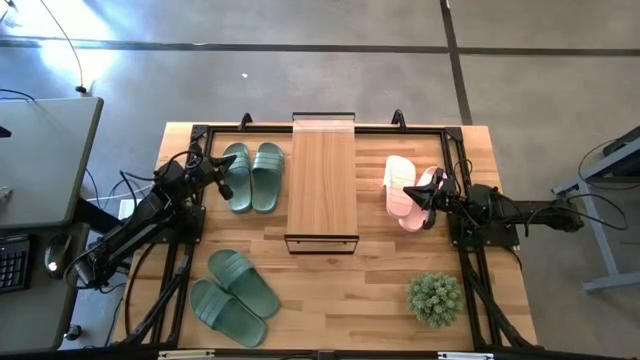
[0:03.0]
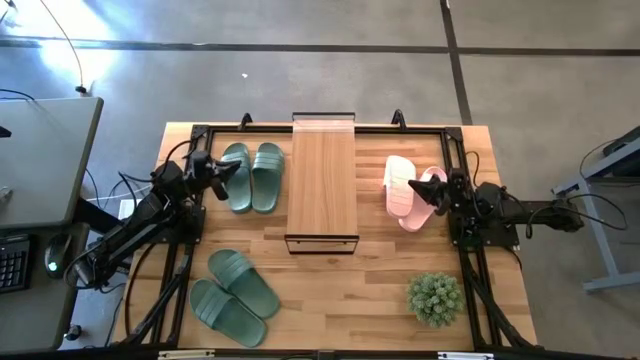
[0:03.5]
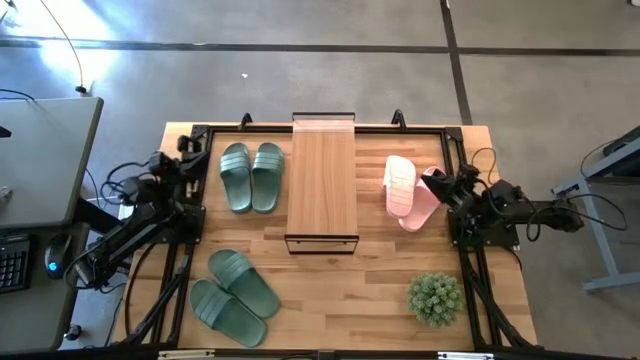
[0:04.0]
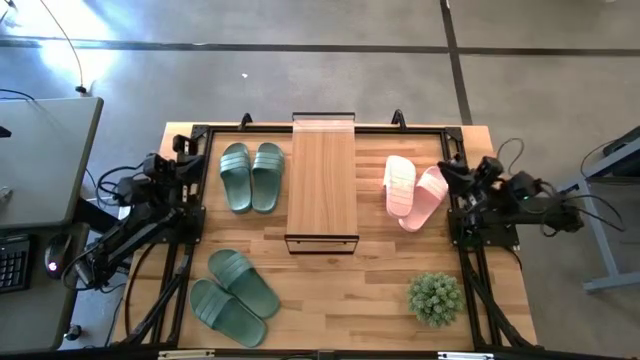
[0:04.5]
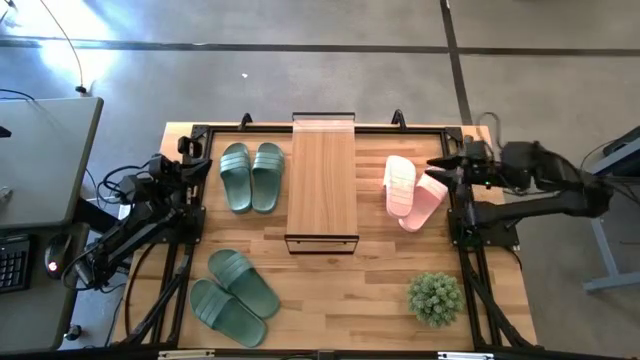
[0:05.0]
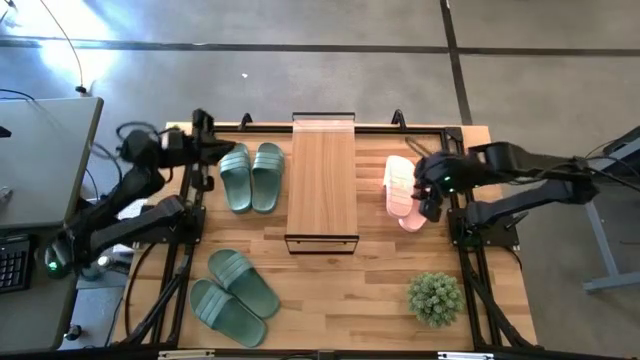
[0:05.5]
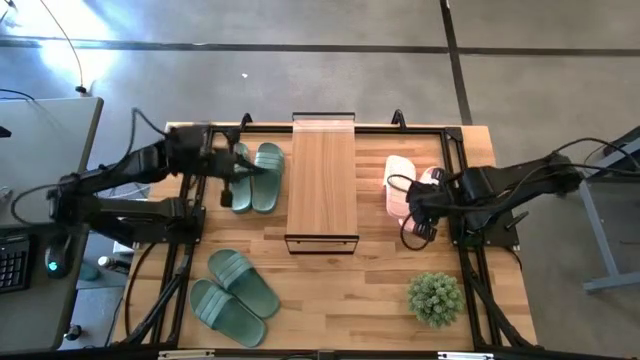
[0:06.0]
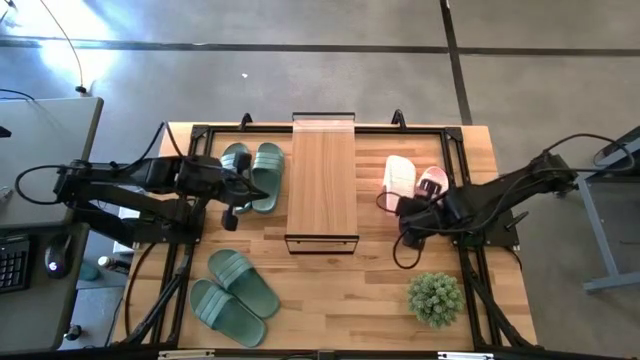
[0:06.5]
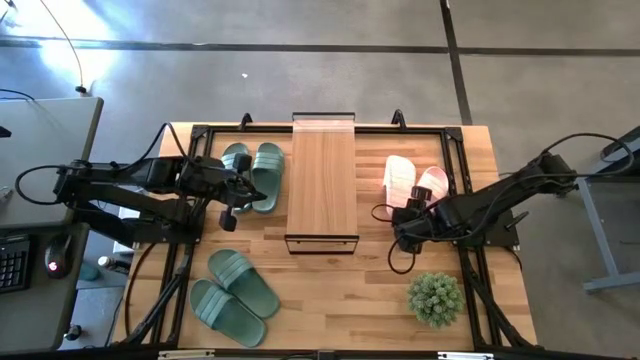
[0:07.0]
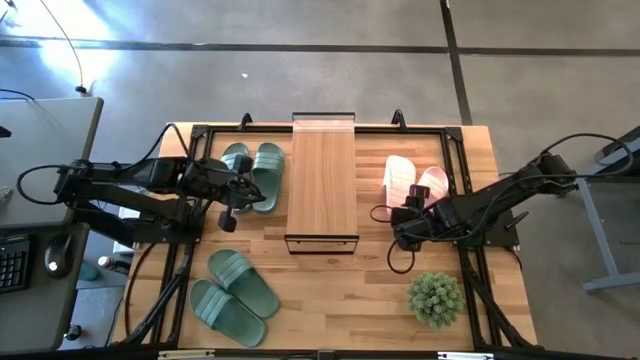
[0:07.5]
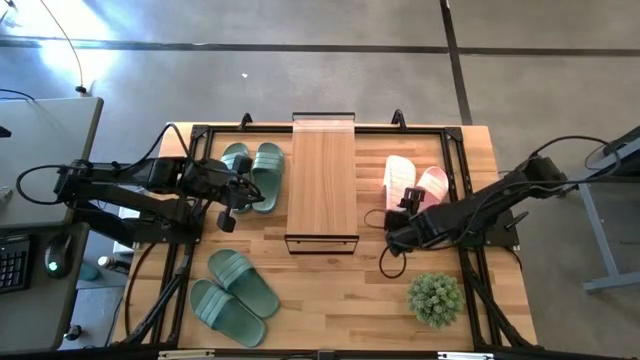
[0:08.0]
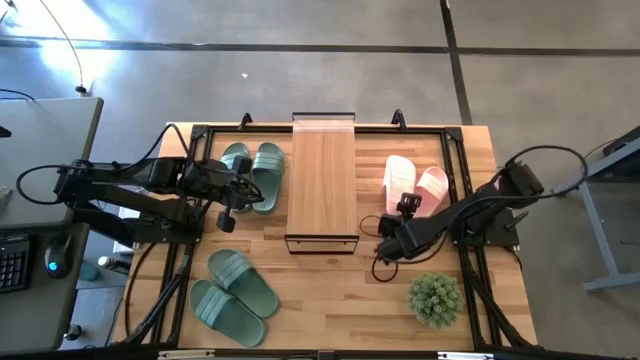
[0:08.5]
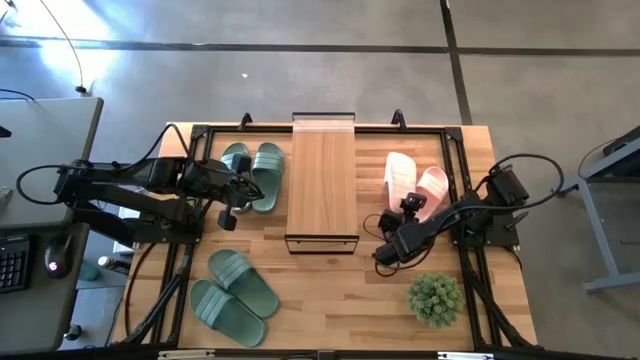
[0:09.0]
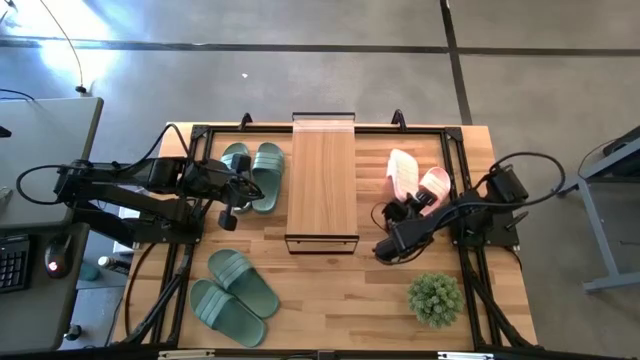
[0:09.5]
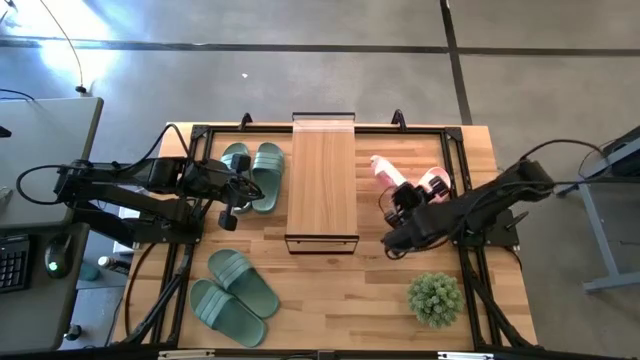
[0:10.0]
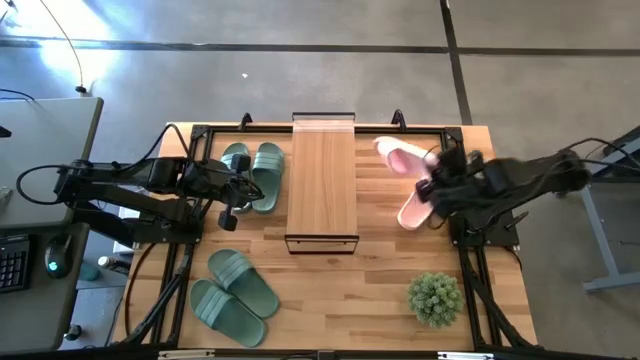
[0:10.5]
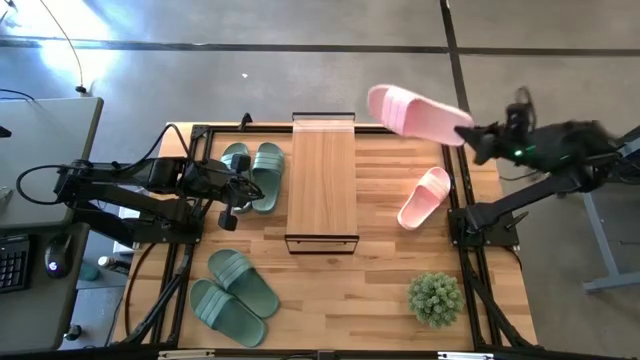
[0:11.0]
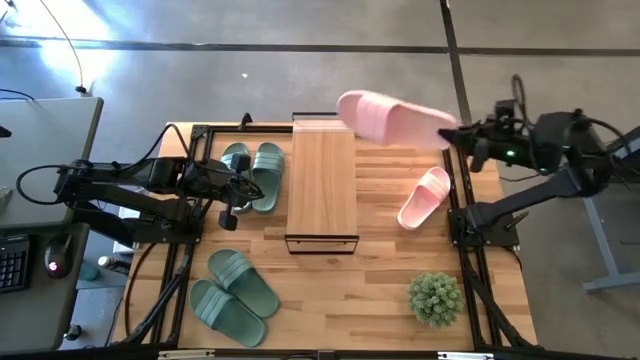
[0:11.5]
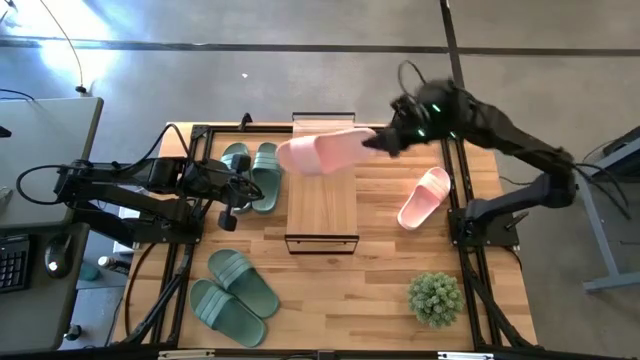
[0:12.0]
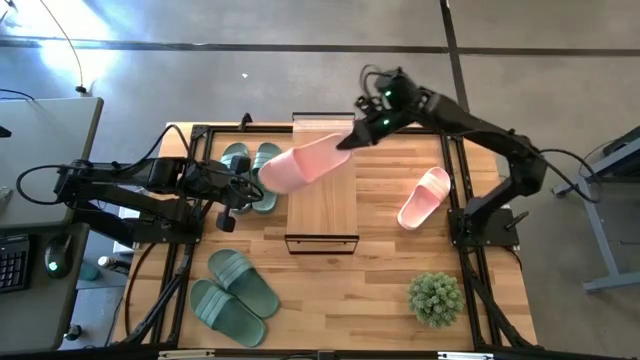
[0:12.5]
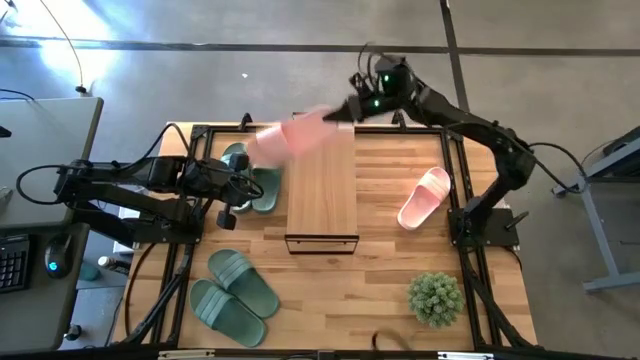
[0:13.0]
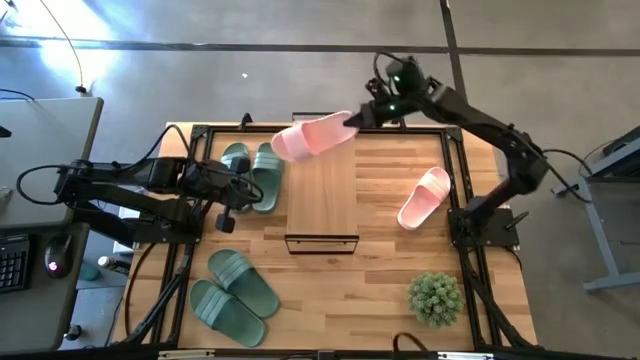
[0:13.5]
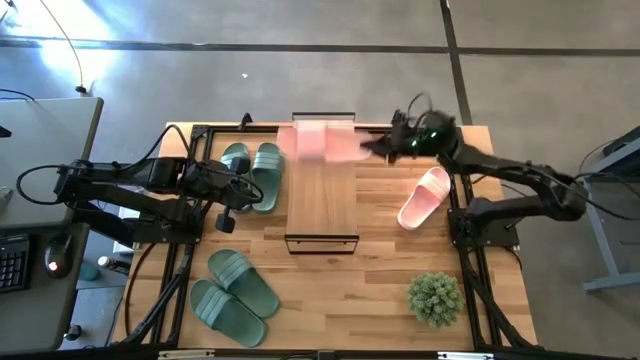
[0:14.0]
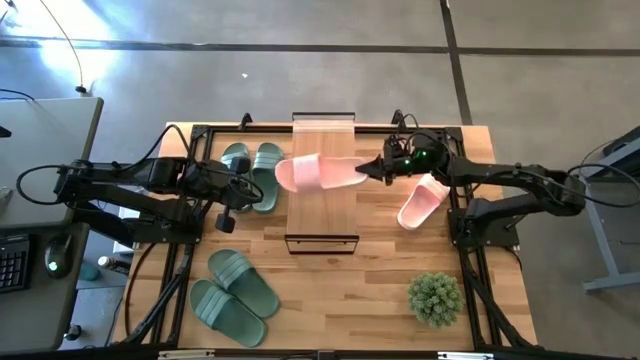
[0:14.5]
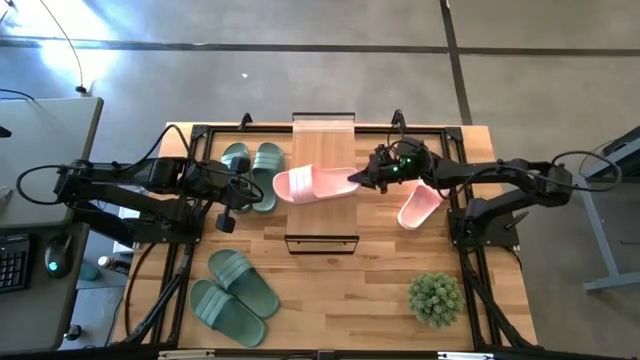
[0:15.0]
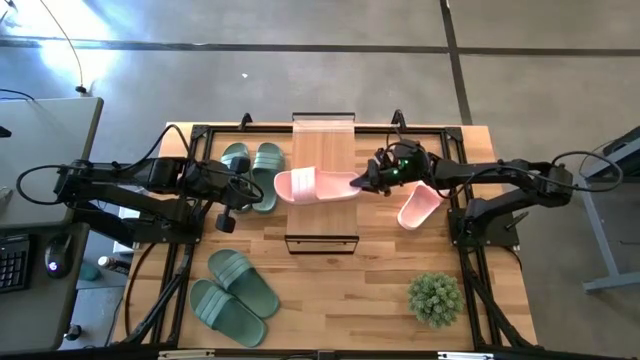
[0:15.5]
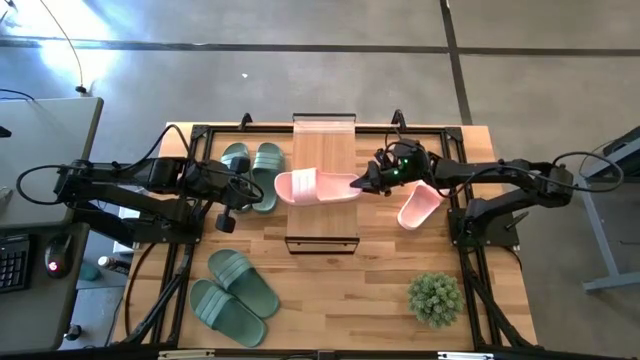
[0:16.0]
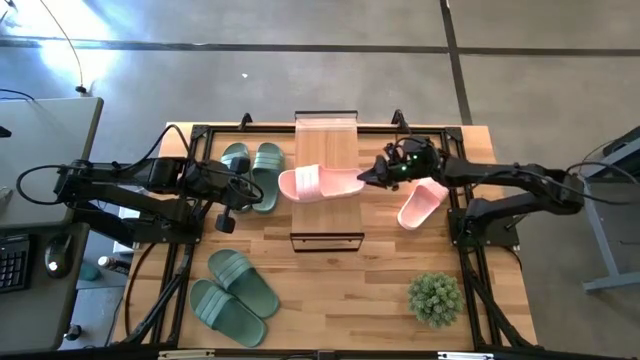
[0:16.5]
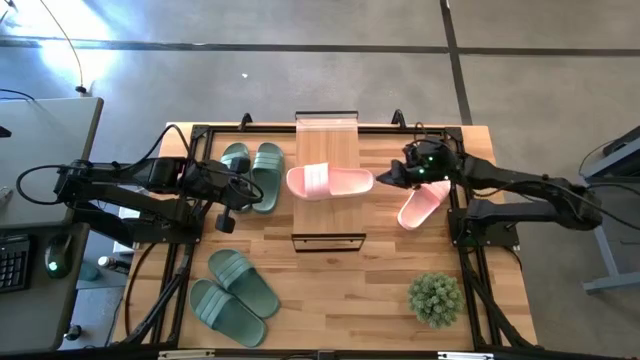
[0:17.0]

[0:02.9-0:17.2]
Task: Pick and place slides into the shelf
Put the left pink slide on the shelf

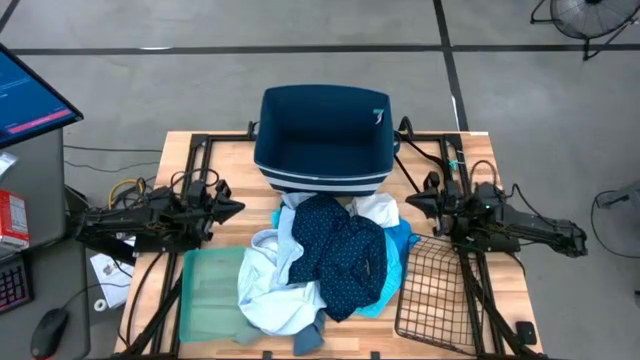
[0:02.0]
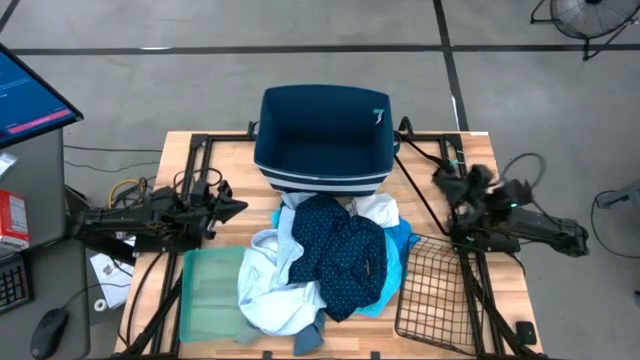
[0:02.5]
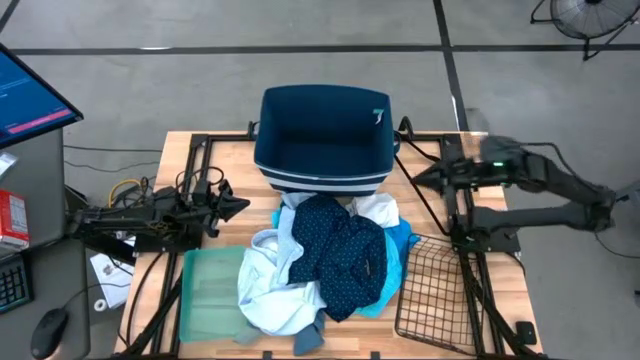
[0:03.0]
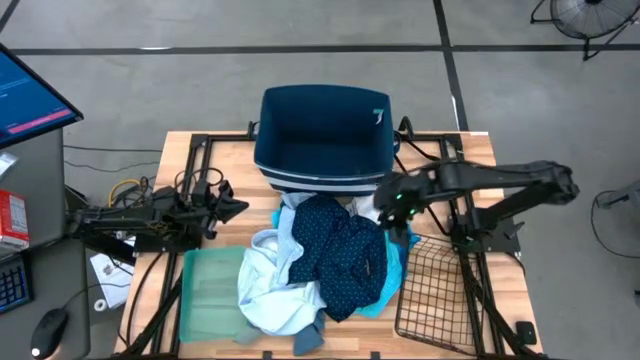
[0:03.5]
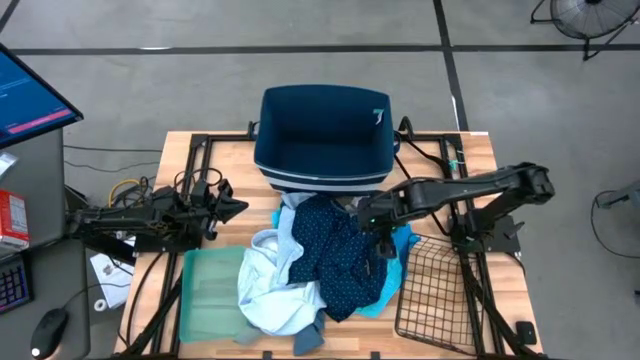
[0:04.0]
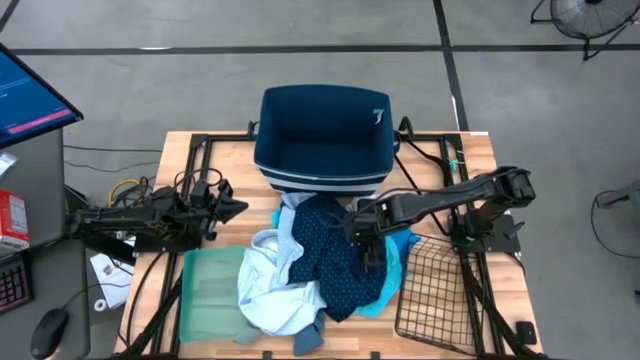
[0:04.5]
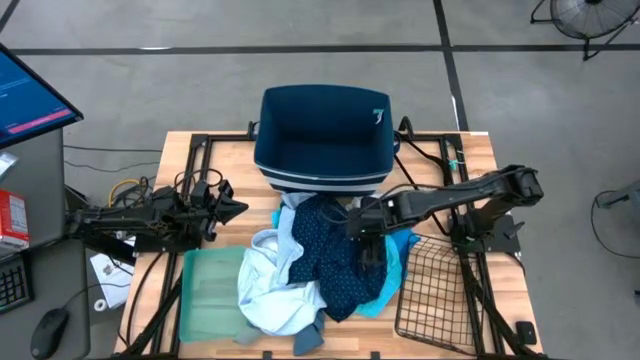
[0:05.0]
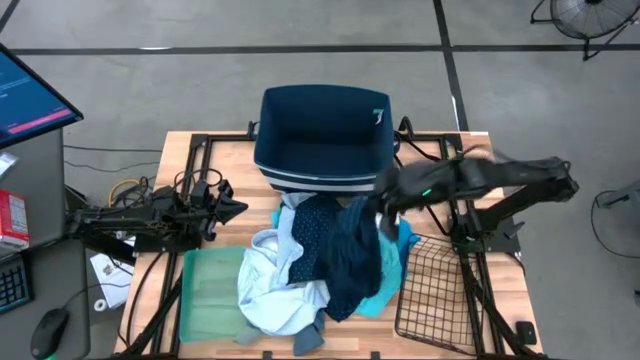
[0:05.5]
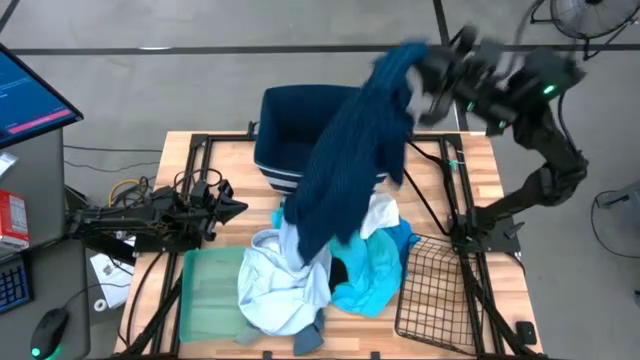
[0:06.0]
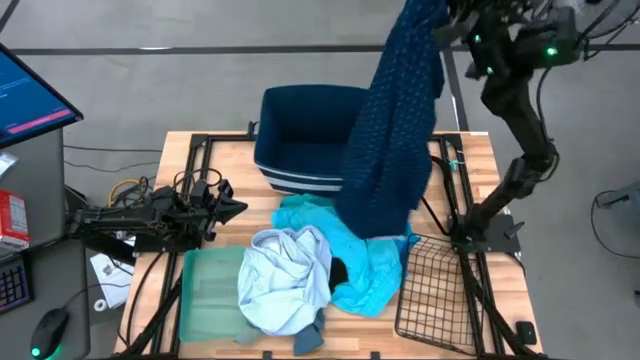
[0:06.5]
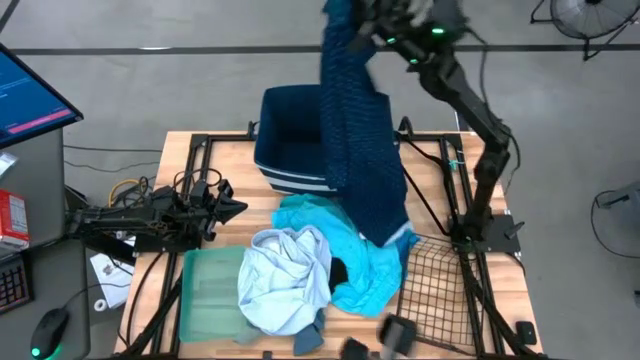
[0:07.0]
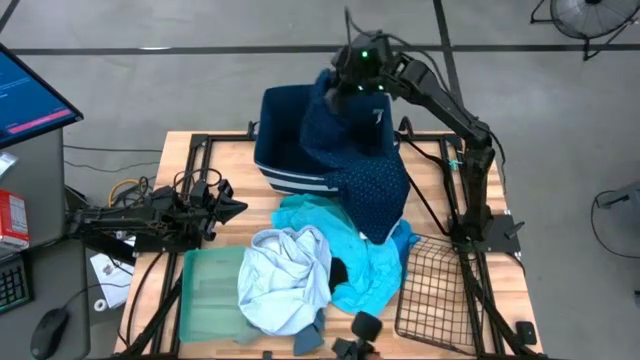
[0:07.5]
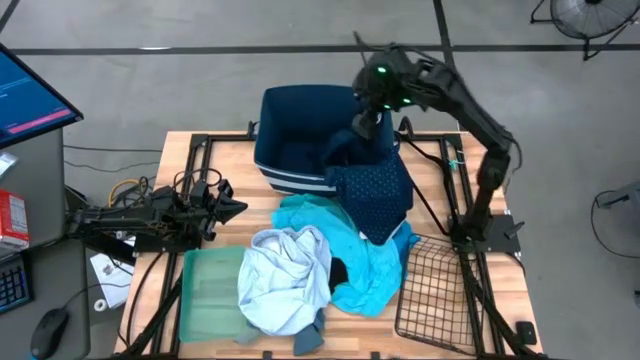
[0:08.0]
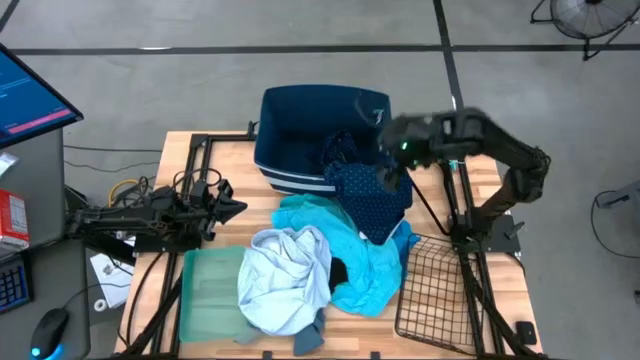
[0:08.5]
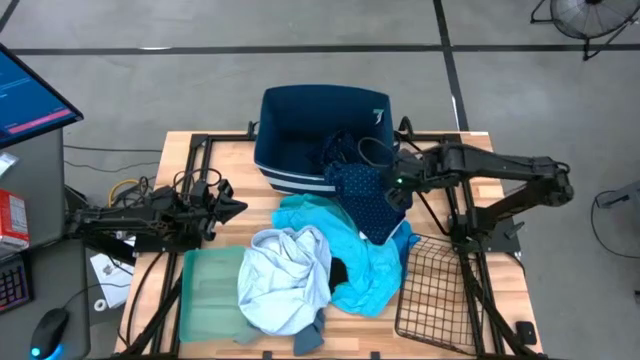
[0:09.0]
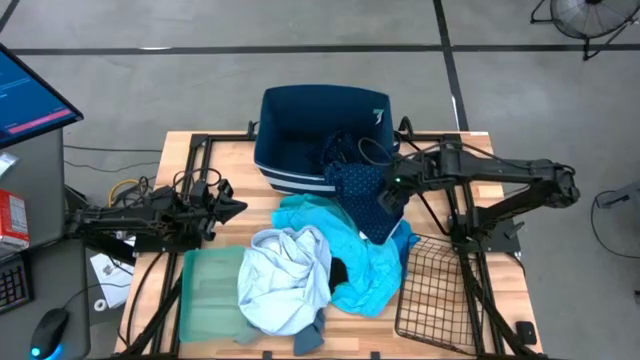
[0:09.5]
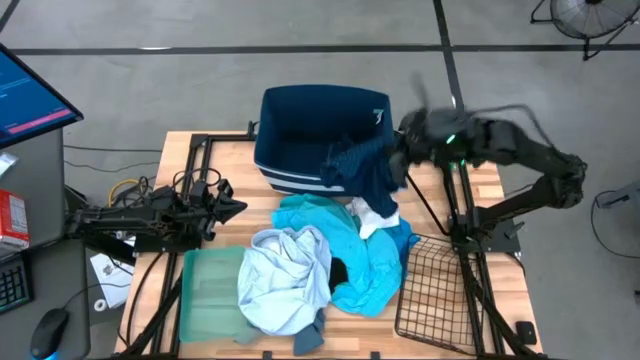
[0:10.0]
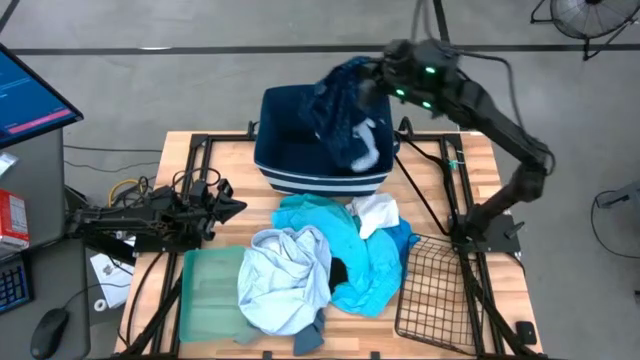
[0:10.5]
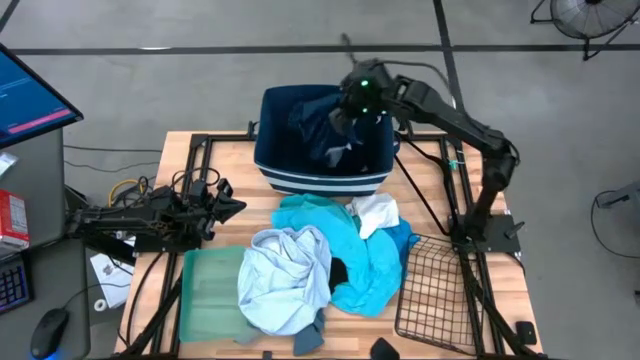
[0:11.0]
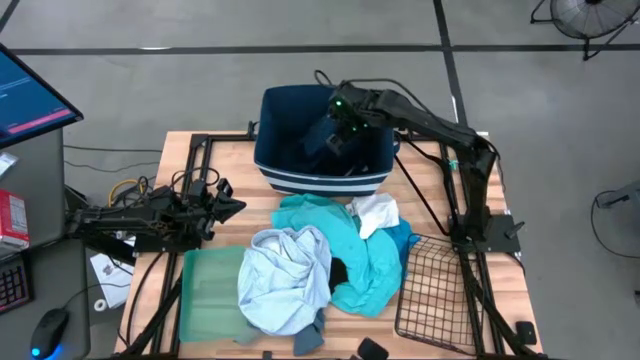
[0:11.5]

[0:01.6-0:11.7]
Task: Pick & Place Cloths
Put the dark blue polo into the blue bin
